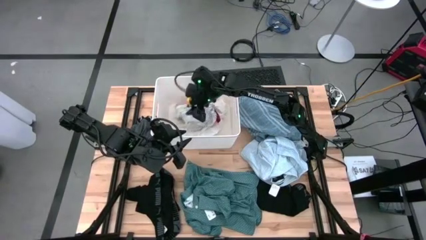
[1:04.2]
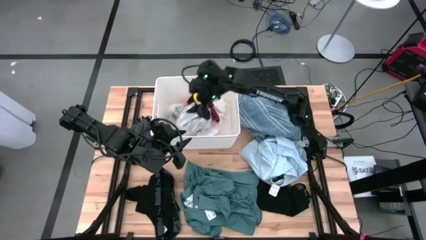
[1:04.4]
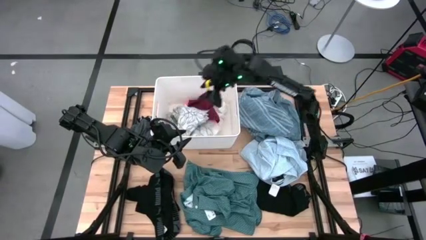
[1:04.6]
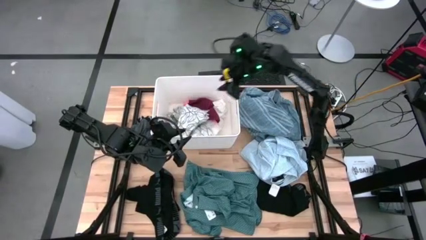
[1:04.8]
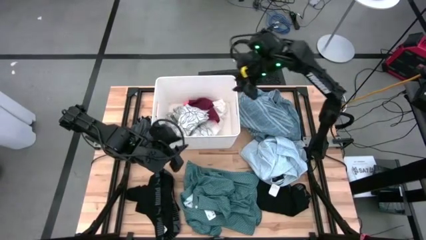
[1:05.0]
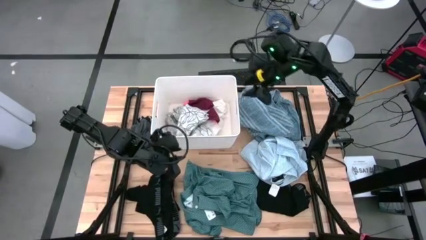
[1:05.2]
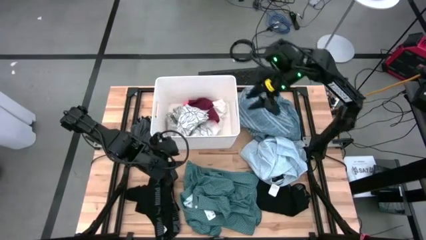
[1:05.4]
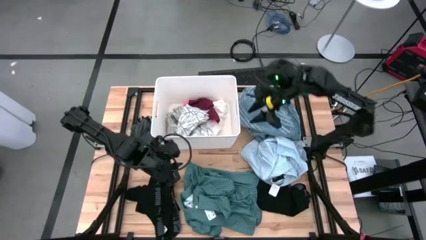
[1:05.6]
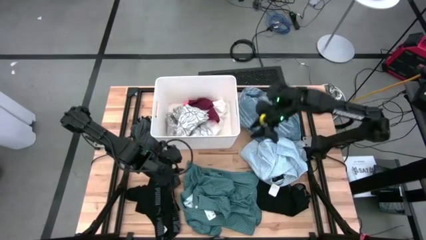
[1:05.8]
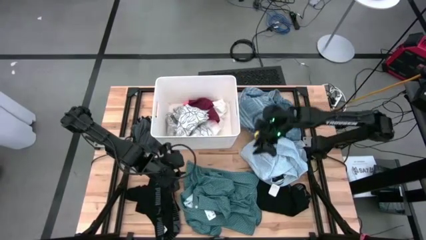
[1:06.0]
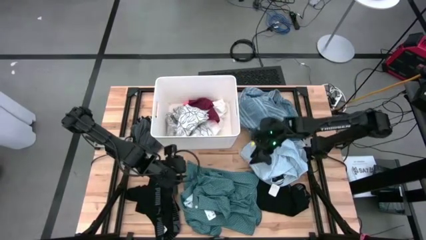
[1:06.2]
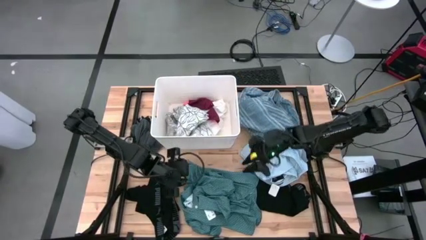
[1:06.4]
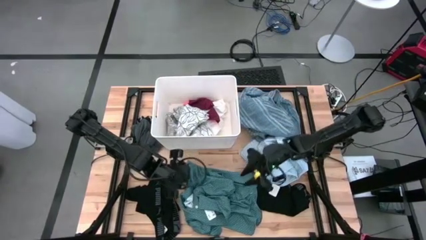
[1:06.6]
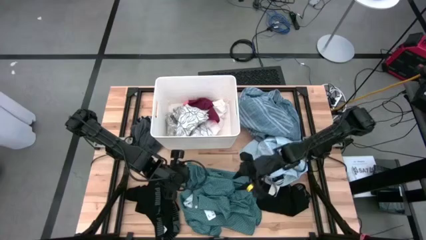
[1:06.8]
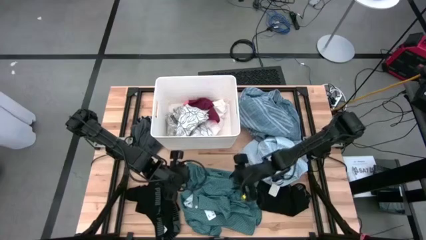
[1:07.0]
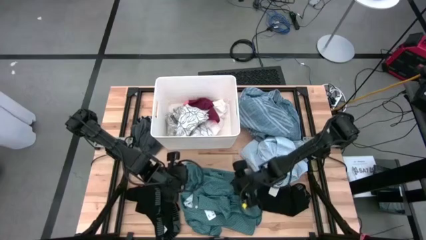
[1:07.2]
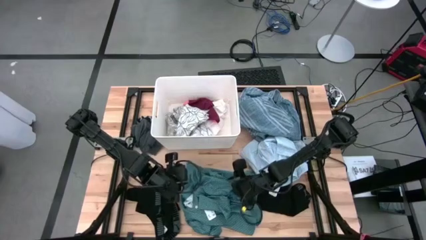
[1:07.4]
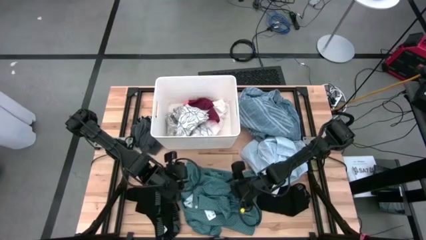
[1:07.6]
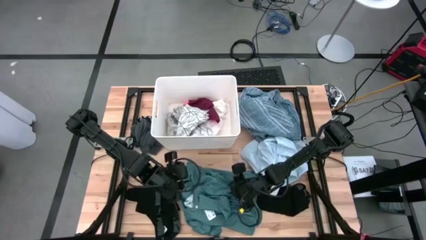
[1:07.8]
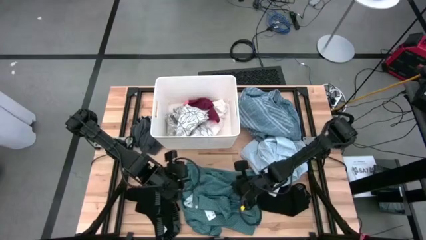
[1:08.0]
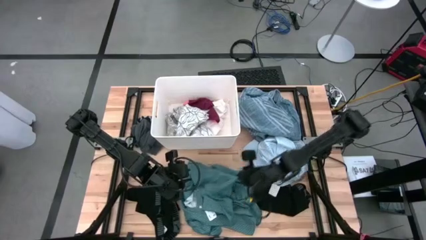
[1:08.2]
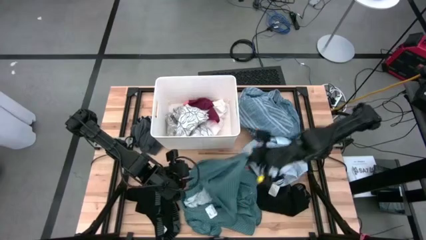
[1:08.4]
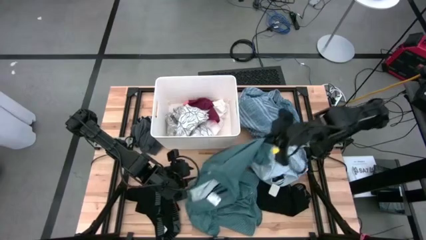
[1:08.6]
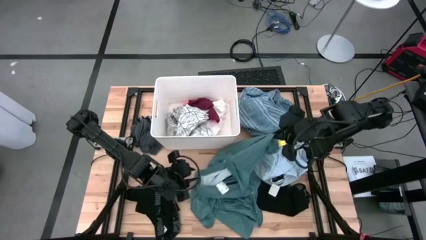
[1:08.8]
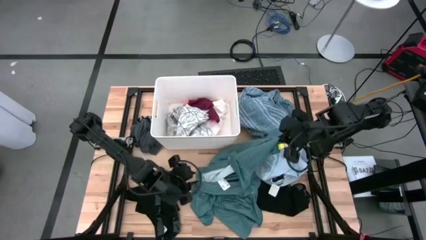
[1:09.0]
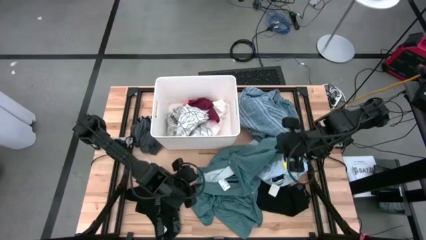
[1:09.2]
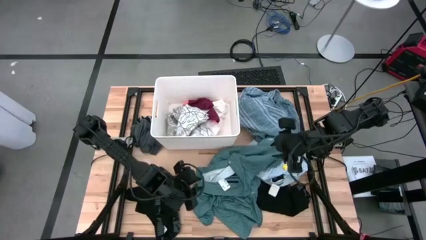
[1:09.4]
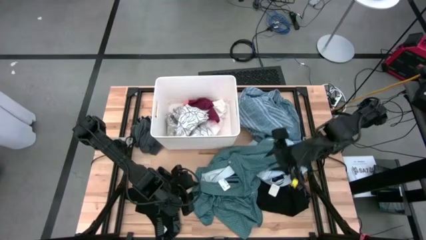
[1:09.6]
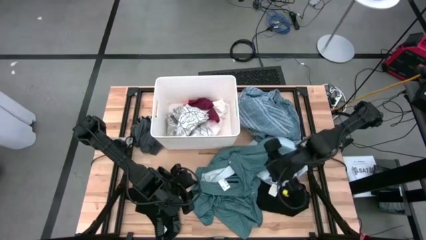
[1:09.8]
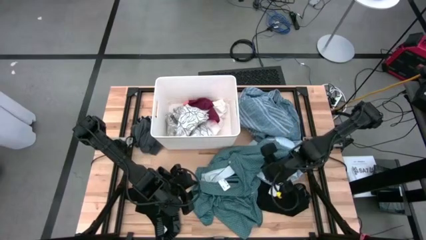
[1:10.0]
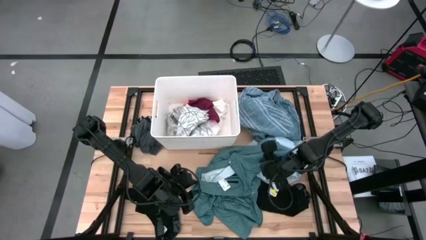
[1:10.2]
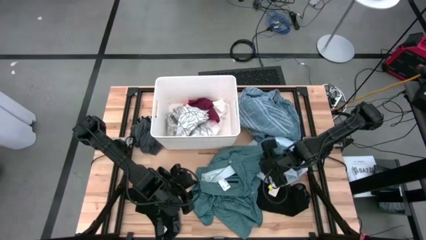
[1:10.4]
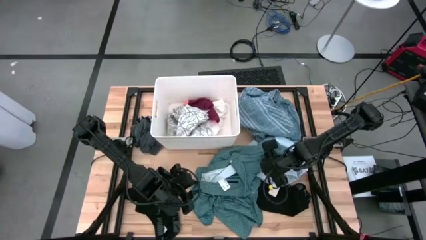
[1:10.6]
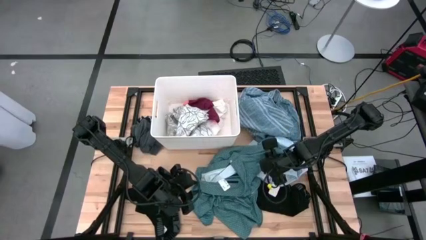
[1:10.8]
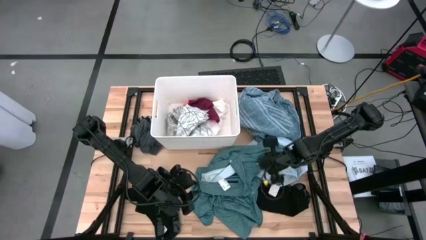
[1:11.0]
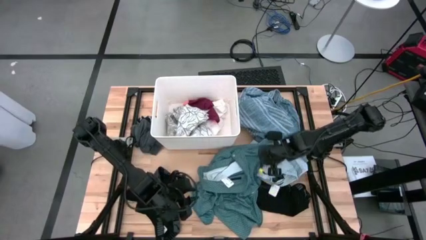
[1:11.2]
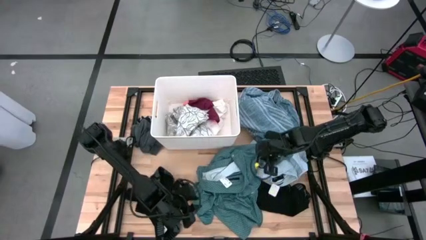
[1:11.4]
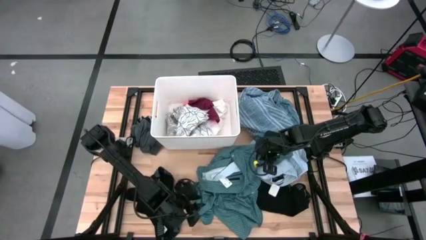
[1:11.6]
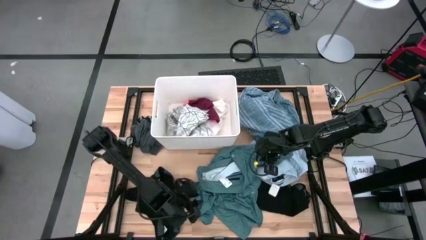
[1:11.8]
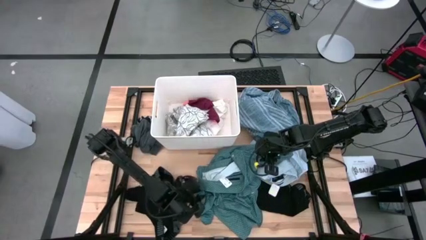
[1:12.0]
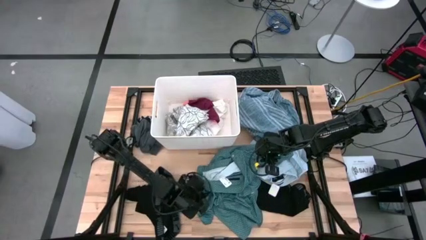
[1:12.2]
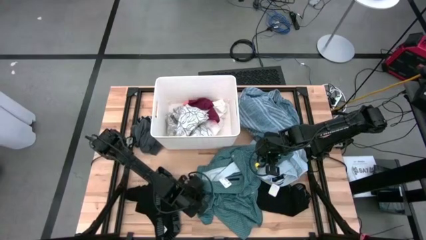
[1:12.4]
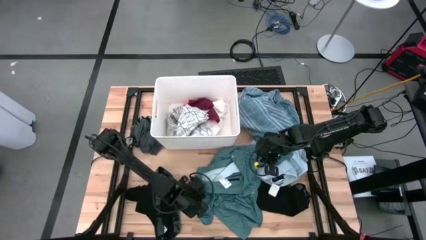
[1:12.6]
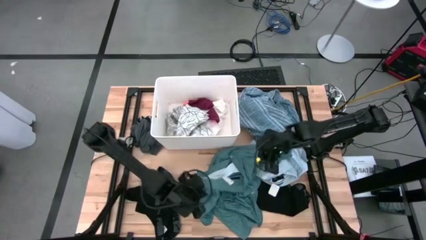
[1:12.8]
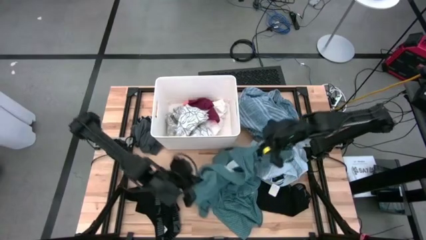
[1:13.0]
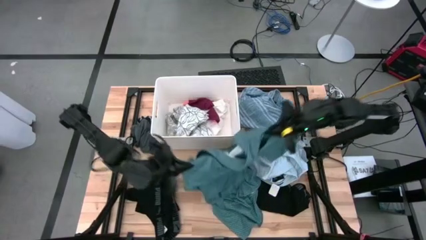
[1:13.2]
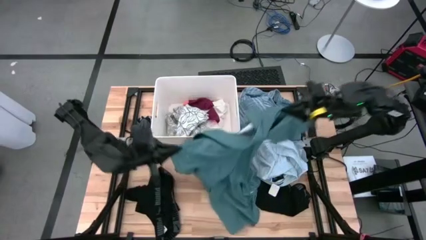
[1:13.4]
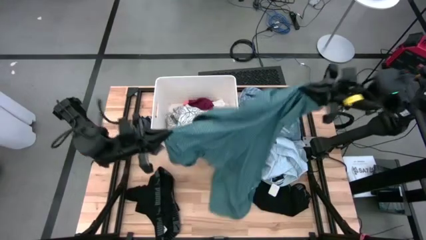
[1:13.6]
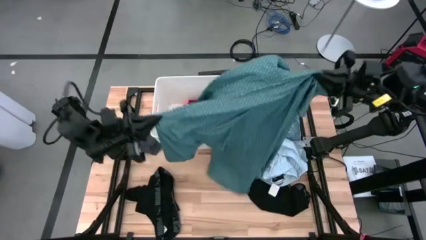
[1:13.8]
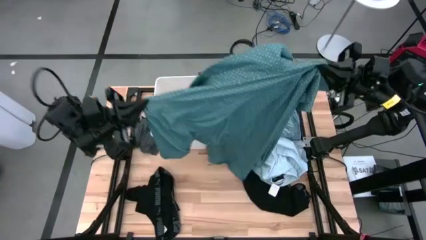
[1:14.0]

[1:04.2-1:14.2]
Task: Sort clothes
Fold the green polo shirt

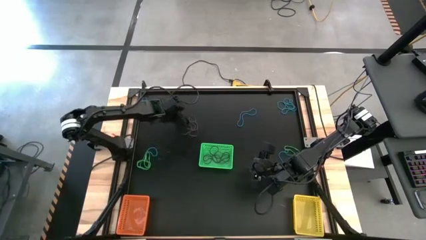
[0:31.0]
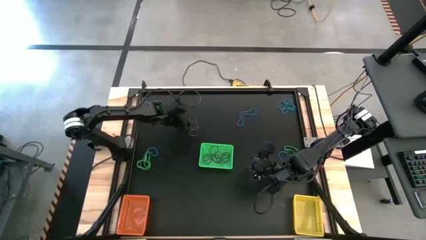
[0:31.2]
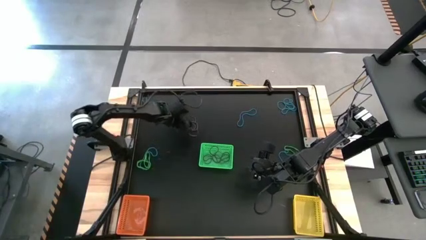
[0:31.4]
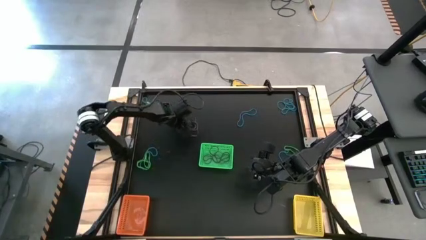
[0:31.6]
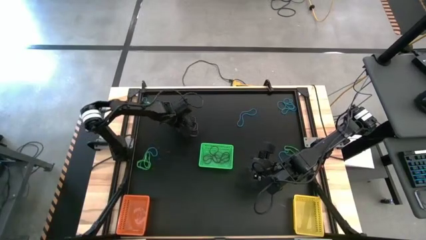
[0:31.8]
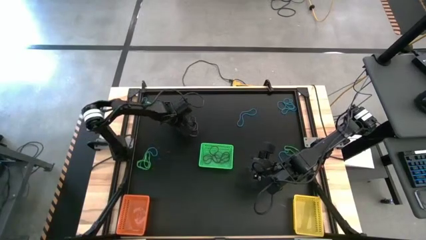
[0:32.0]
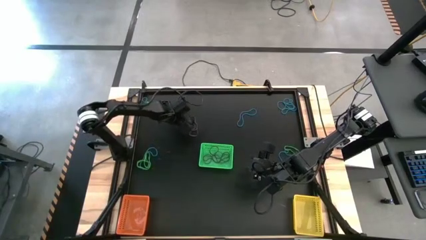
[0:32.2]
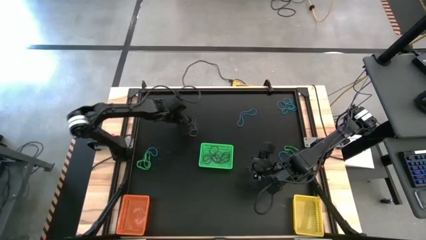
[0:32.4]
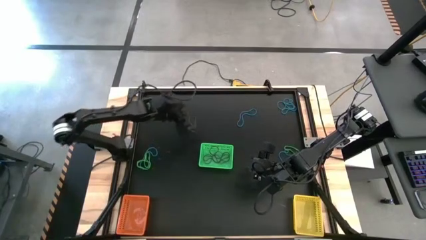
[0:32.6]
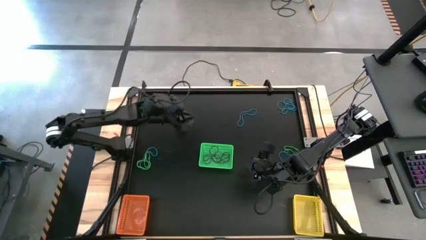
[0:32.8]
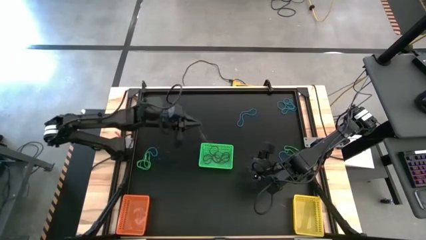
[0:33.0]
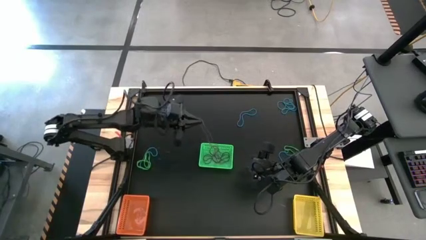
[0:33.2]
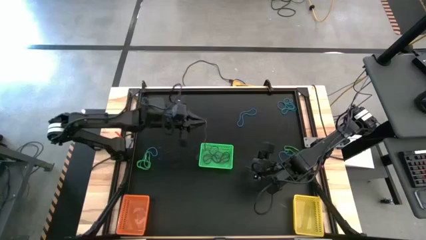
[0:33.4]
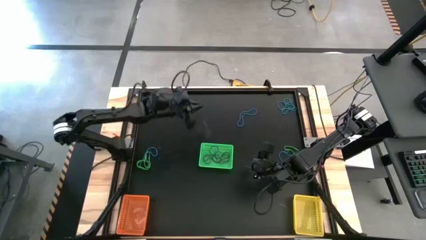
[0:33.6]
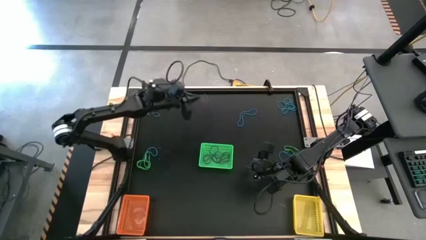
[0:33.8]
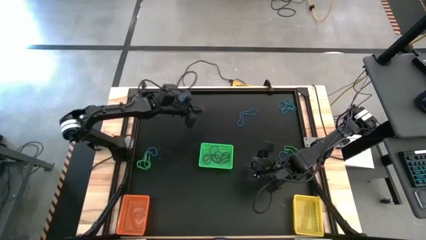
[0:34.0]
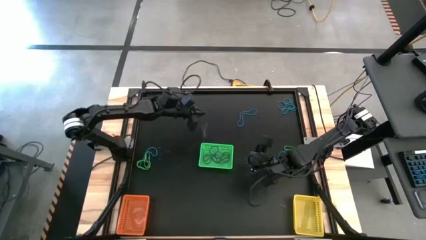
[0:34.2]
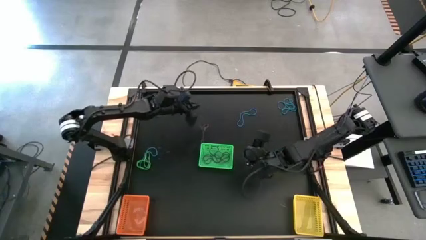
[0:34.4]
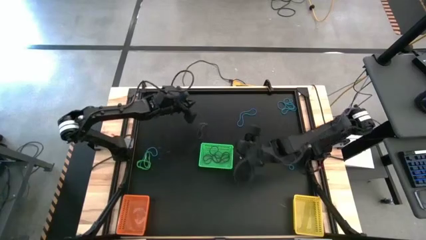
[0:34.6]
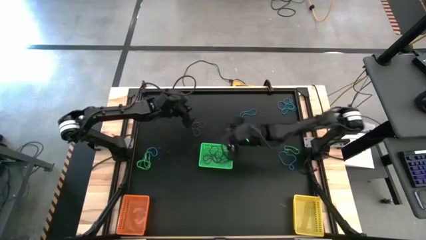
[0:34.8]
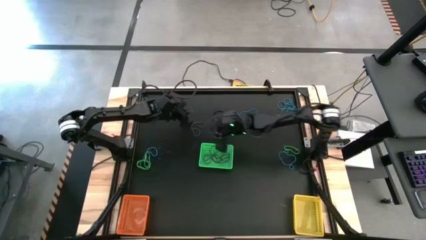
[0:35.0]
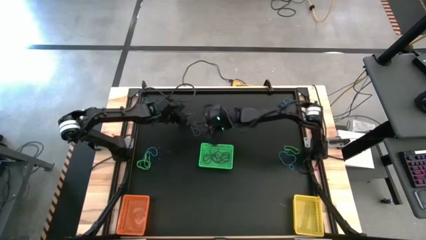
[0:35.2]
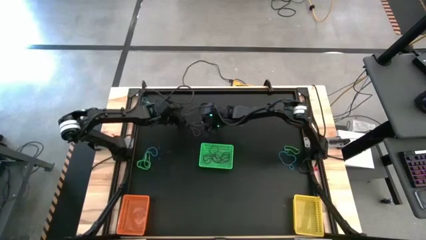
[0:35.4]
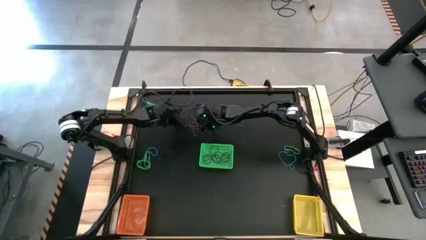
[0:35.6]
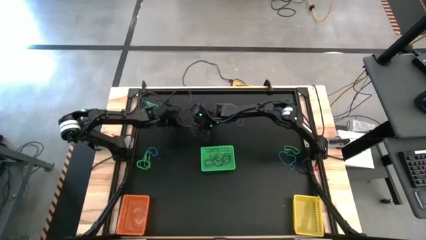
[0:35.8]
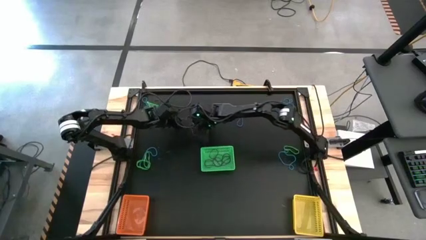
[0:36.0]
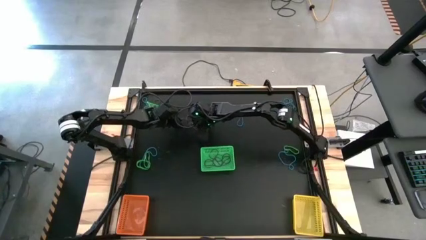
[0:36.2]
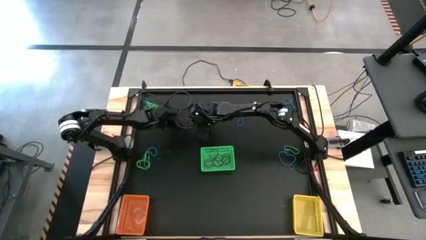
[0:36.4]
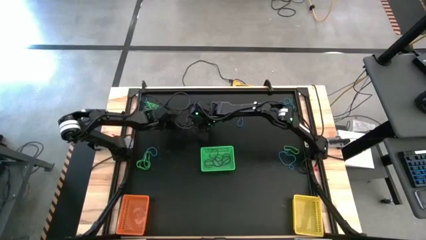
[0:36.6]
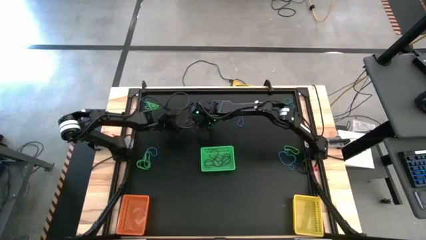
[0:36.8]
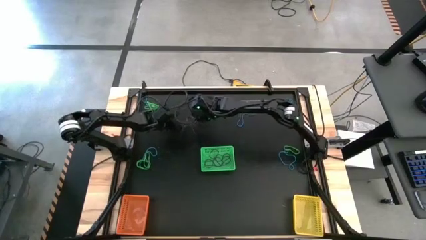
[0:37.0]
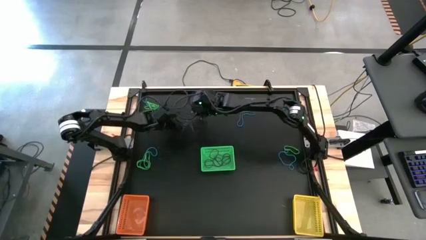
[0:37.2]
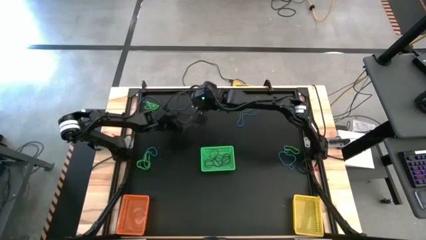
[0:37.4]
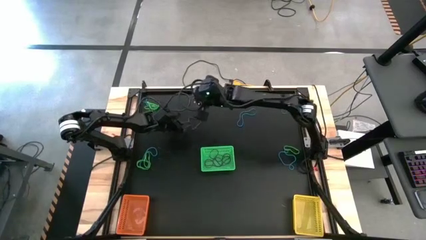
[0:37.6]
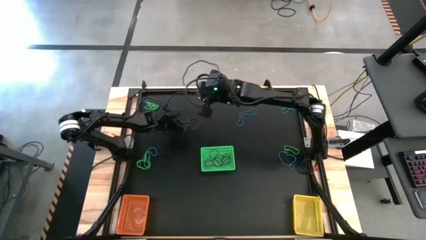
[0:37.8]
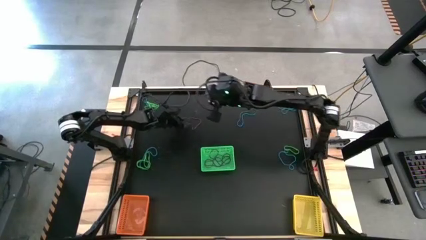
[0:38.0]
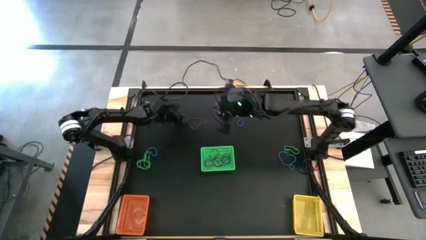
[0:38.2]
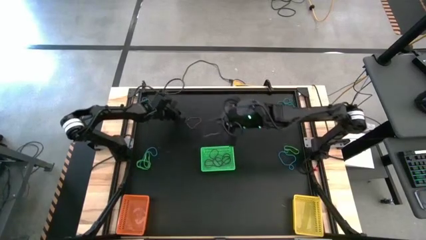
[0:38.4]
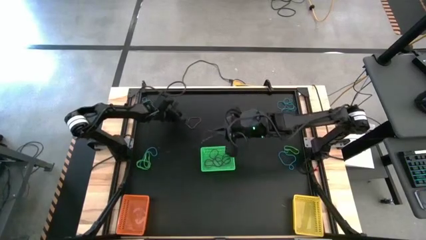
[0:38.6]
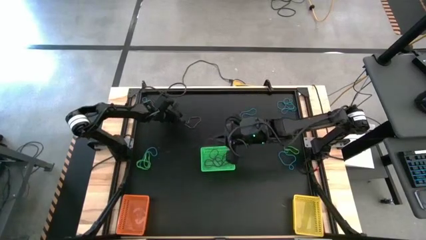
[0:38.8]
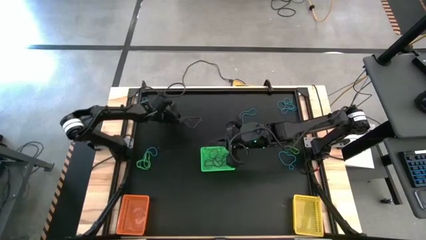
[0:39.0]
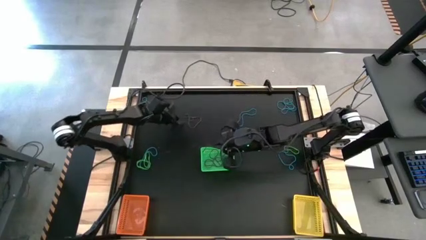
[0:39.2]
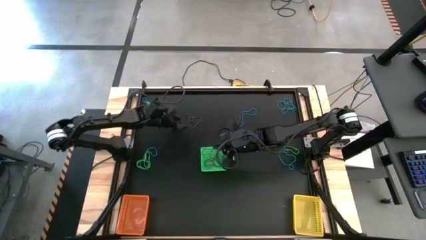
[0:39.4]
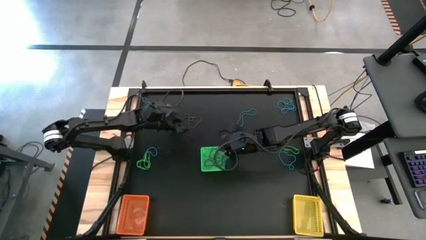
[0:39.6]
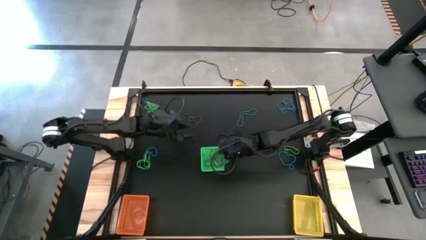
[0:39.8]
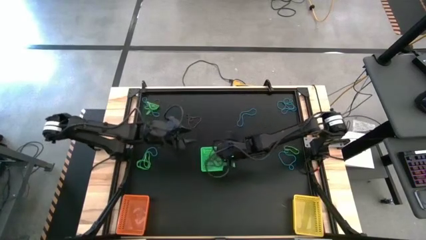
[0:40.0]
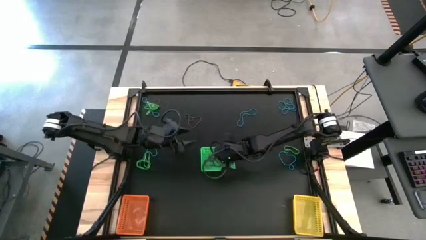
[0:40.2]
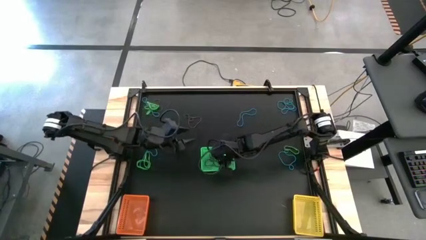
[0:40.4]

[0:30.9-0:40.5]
Task: Sort rubber bands into baskets
Put the violet rubber band into the green basket
